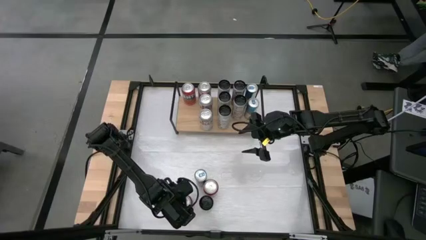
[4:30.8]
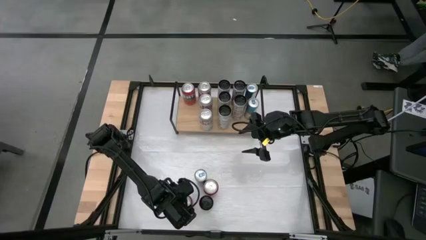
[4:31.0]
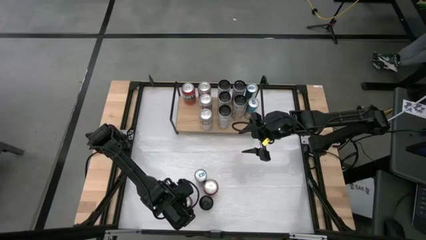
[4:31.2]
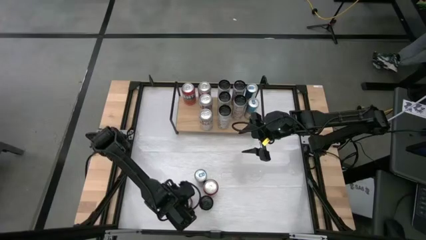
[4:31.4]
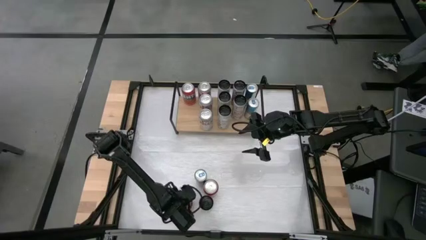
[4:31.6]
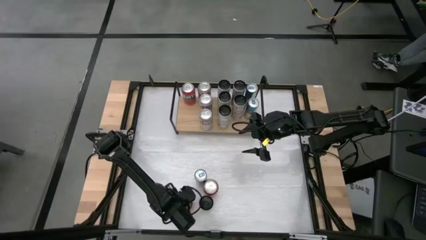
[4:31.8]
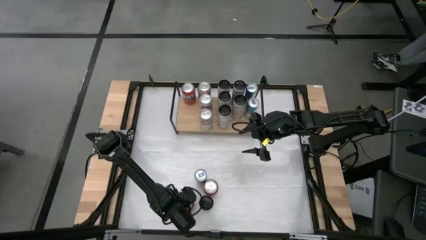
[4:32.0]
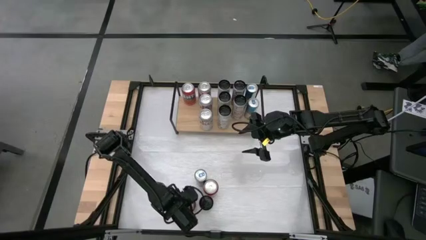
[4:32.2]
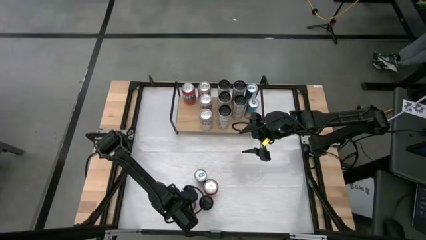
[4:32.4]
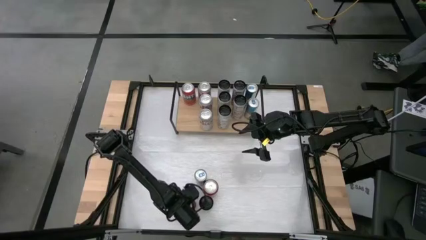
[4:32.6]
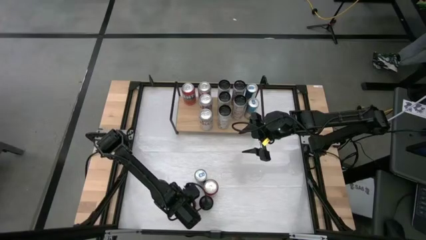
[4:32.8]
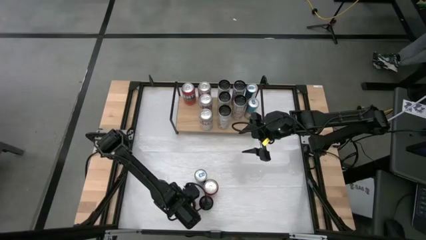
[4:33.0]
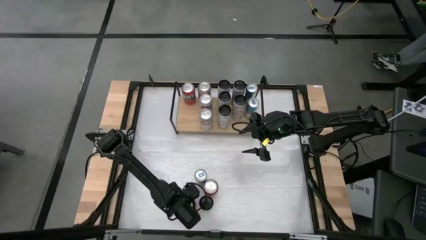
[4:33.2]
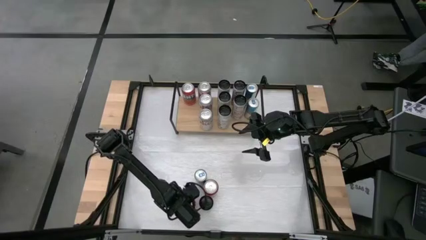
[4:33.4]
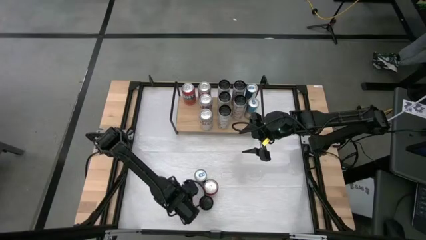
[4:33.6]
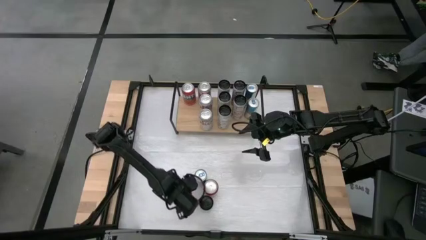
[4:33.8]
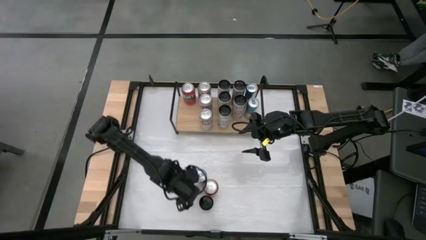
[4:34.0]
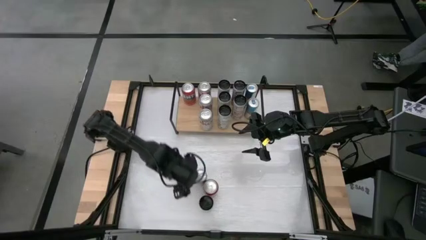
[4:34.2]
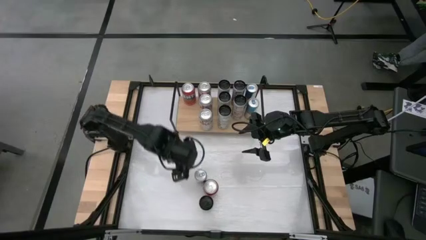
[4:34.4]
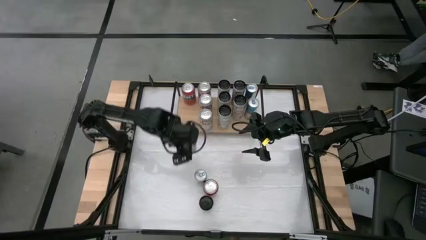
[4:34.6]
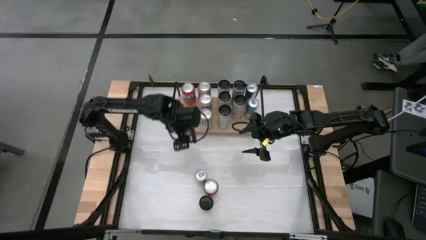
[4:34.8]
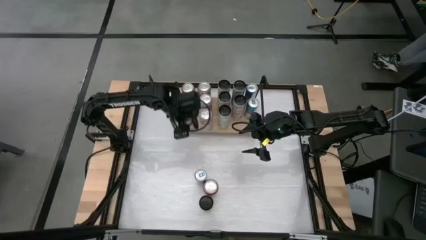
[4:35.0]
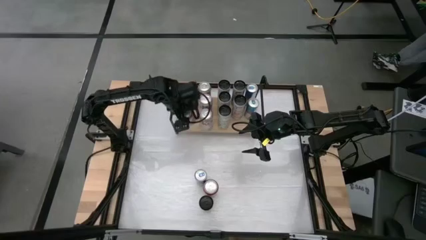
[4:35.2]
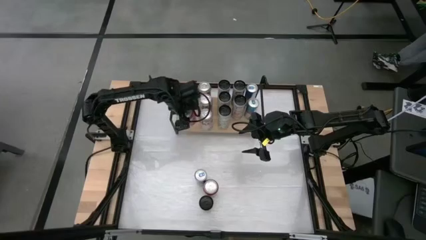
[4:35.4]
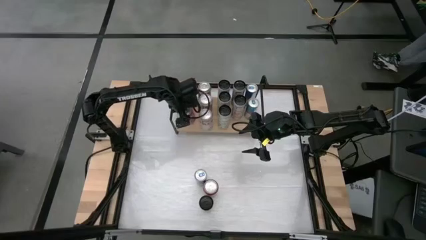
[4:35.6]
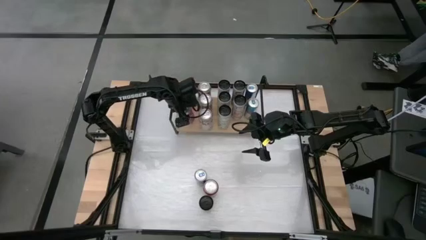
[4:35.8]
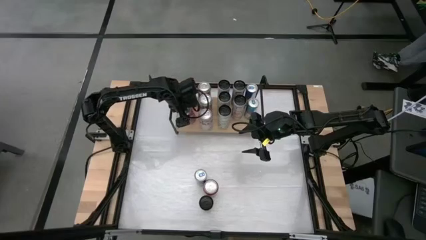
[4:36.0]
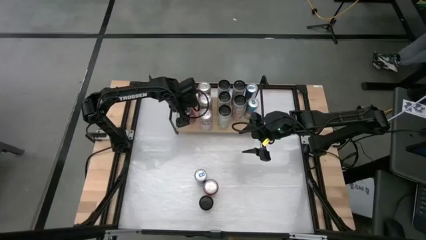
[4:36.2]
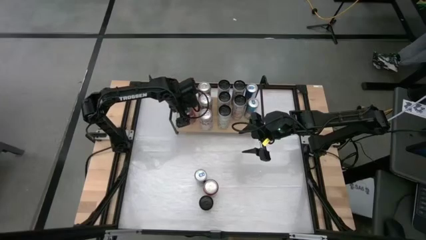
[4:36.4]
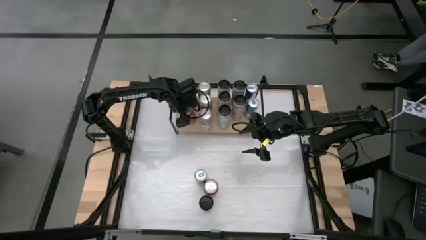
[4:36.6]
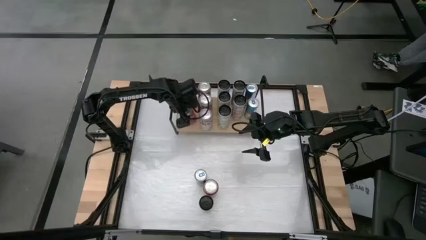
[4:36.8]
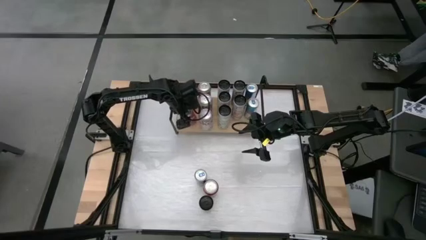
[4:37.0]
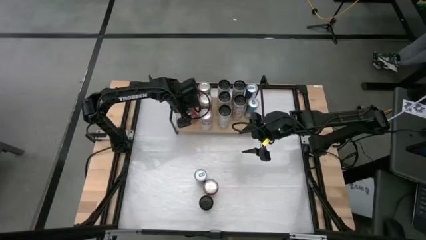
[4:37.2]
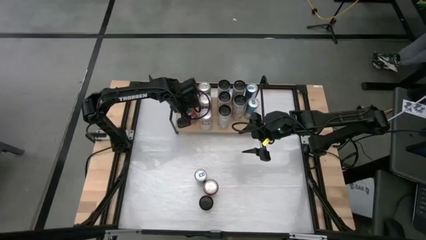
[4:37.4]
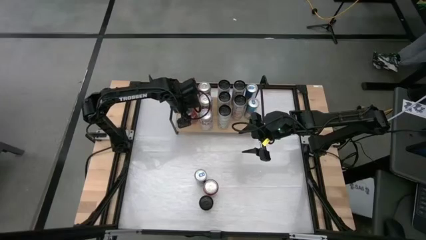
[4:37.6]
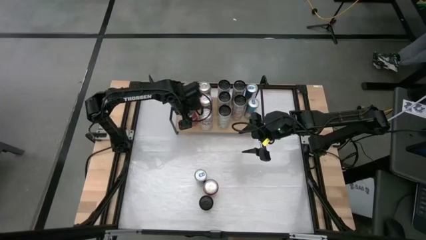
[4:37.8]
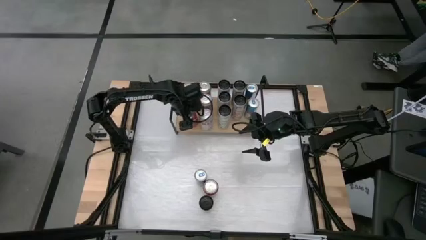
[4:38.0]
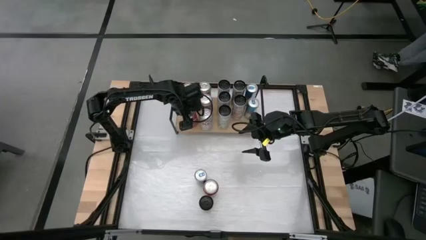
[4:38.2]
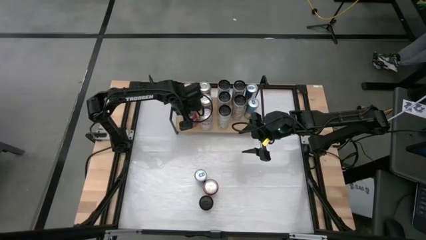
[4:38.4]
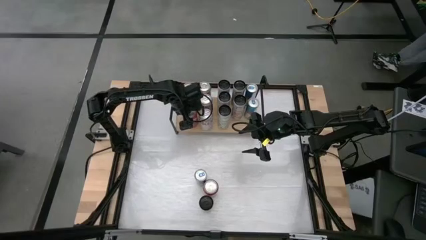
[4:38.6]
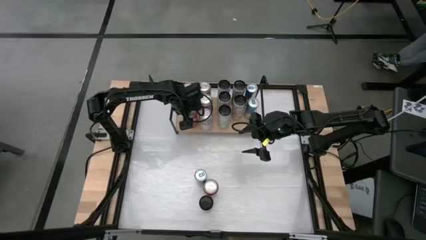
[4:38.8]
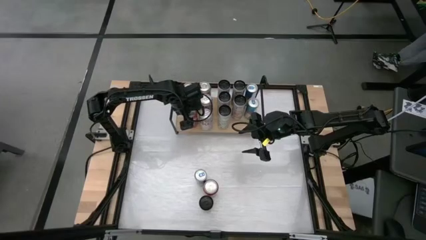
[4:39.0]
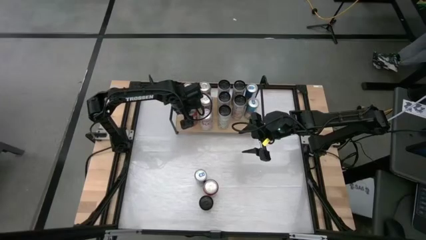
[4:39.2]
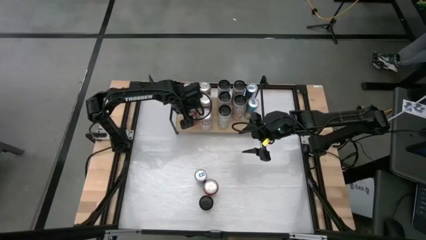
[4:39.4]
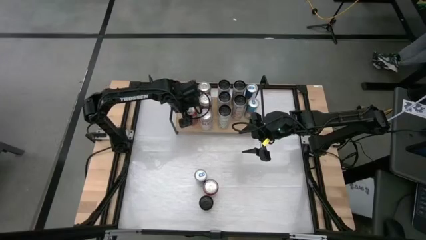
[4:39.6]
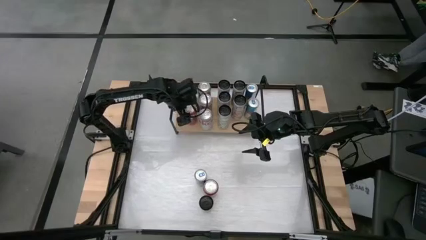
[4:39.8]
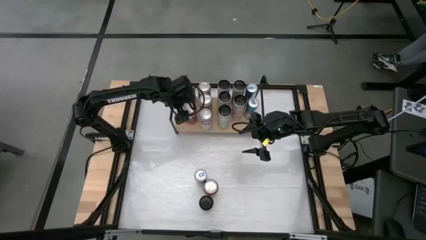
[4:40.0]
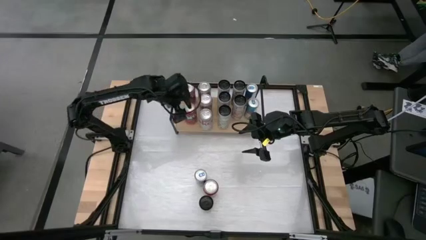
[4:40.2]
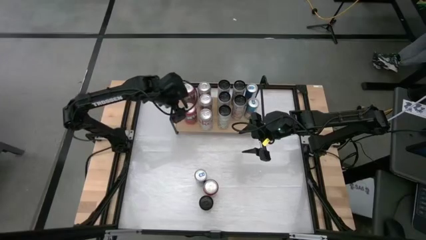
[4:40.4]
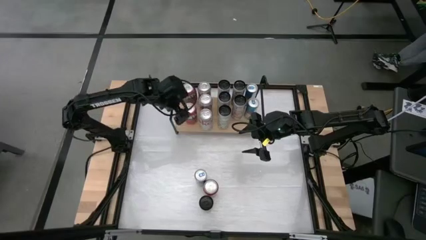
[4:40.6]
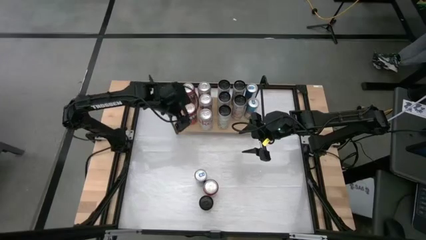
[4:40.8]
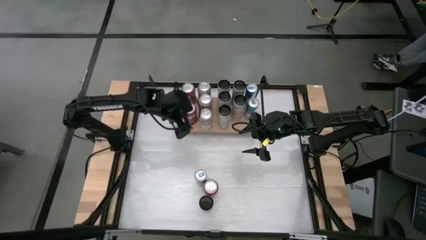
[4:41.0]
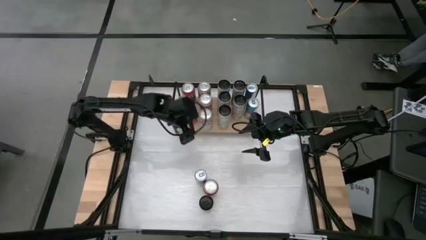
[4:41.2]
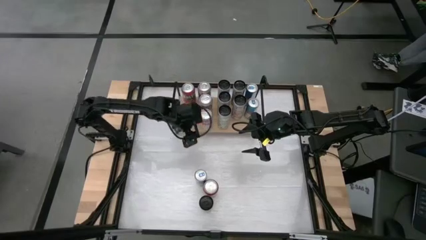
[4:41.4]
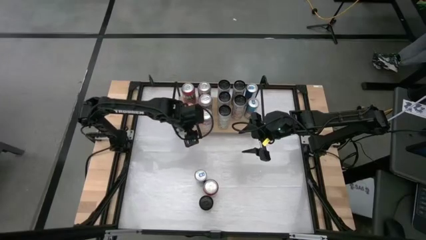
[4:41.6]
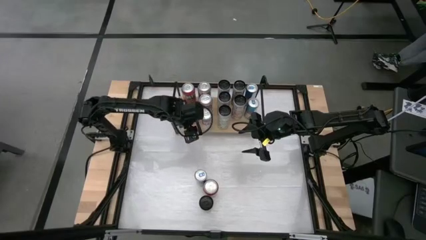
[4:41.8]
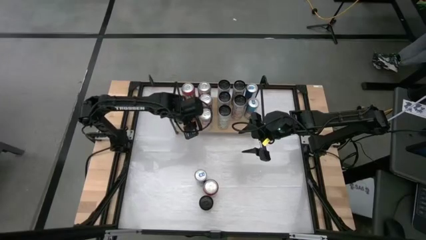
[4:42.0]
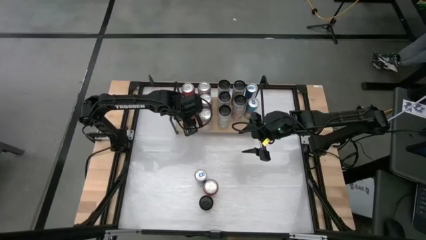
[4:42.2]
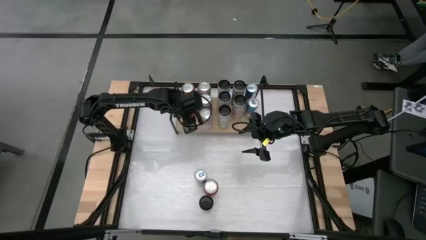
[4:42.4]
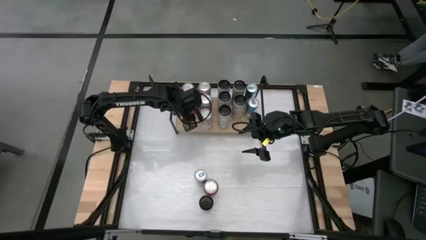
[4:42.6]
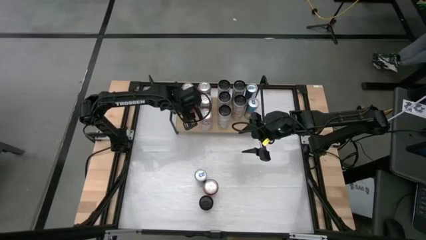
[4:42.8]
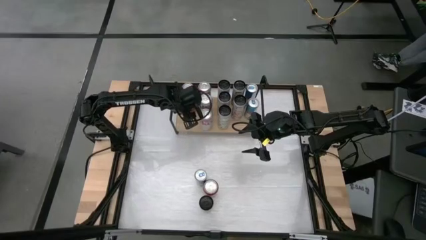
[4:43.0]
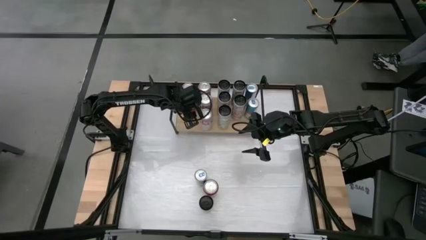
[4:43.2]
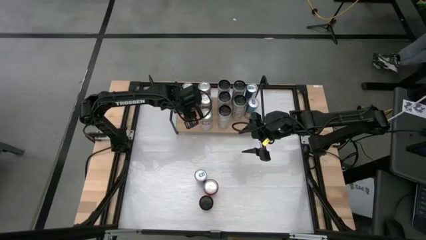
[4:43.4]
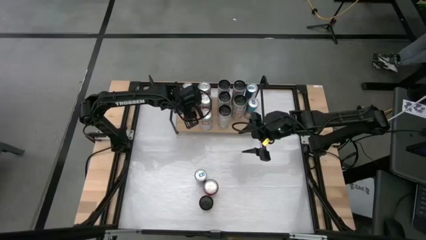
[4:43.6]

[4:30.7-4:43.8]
Task: Place canned beverage on shelf
Put the red soda can onto the shelf aligned with the other red soda can

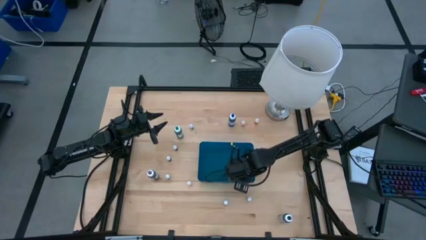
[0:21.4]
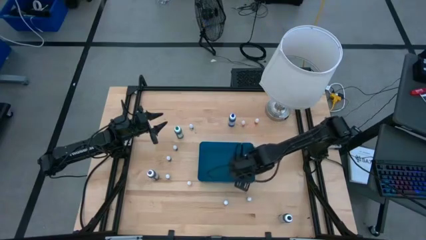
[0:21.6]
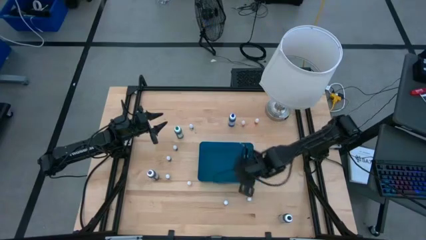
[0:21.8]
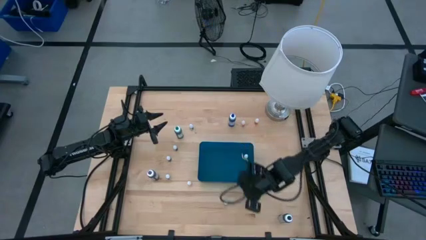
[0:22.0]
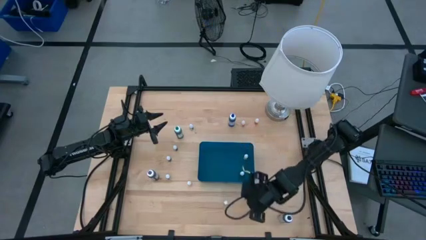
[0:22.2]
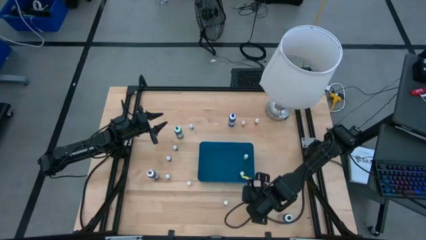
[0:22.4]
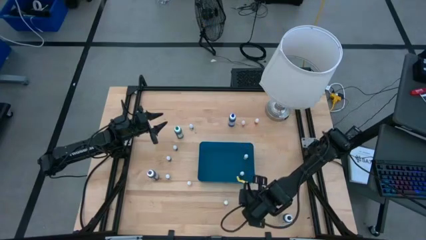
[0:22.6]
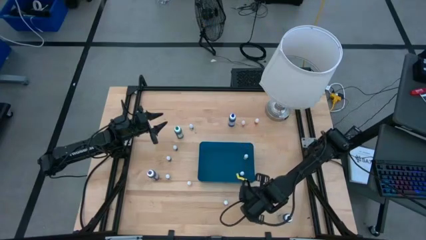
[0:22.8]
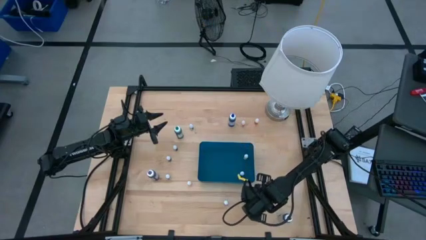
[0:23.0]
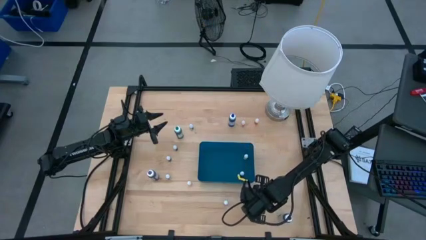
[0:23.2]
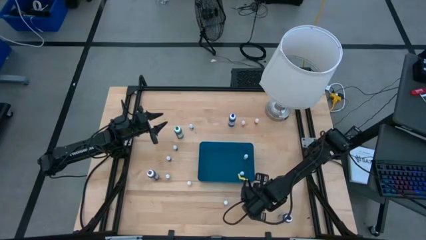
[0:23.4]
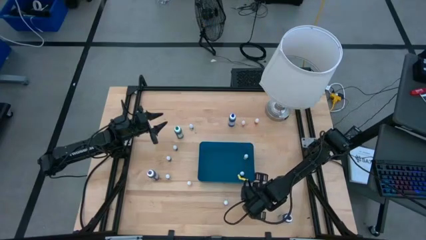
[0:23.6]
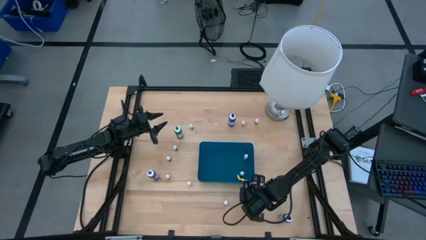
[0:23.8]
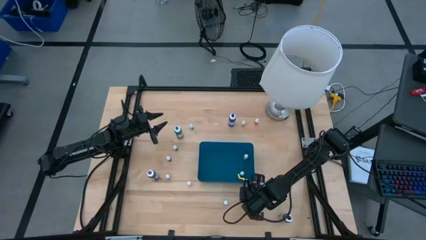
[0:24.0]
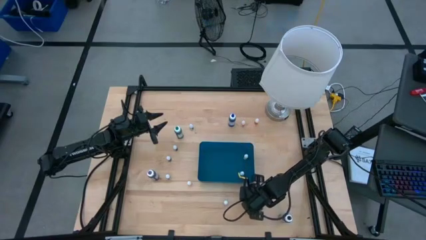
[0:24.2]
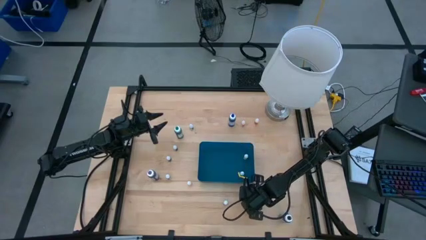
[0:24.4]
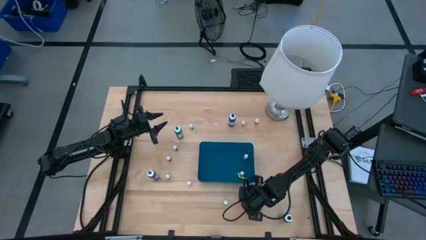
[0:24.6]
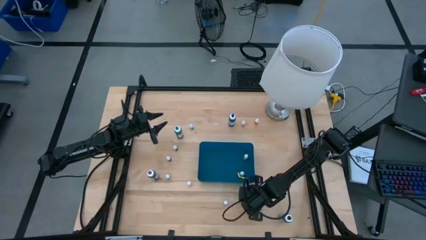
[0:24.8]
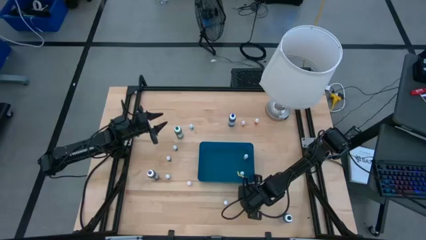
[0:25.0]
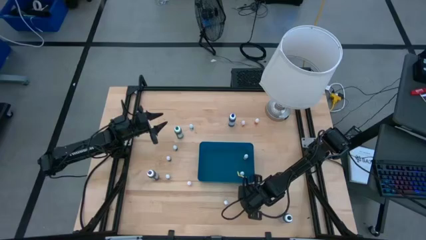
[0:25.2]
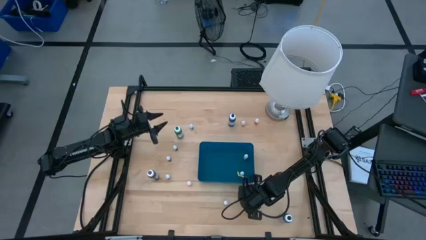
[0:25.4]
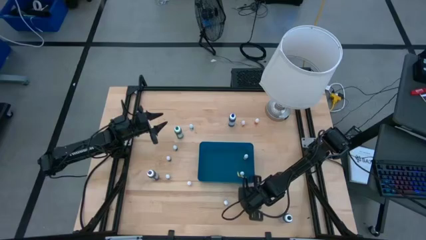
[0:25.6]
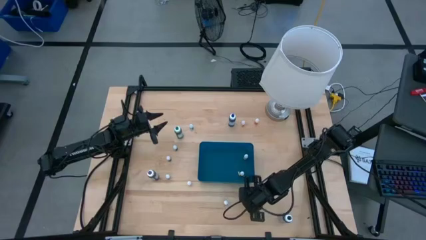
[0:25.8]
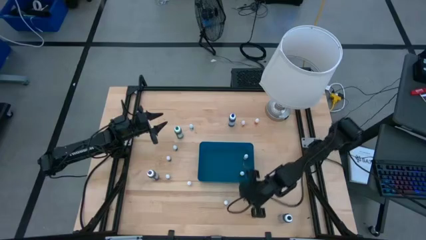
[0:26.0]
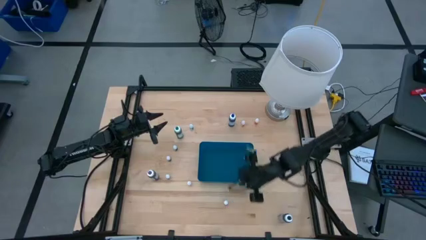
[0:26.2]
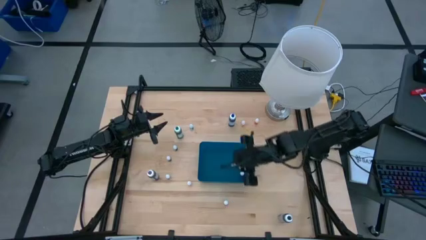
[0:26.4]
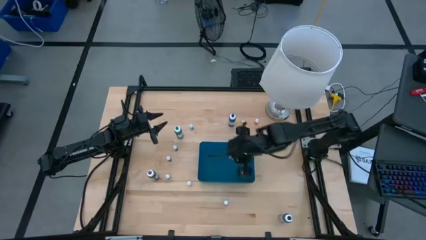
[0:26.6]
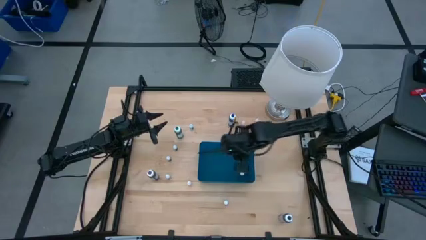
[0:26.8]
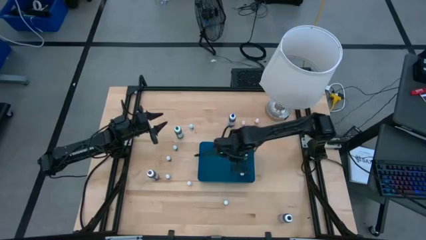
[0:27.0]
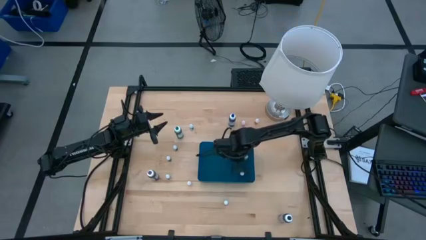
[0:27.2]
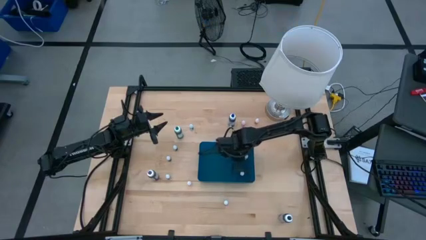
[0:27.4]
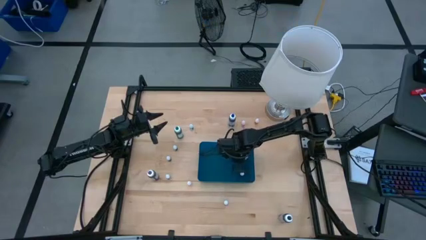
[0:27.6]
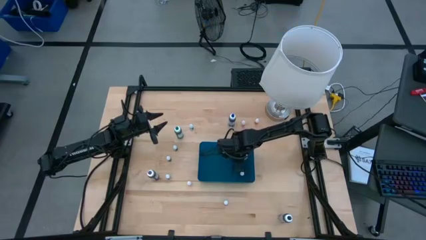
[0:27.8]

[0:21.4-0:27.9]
Task: Pick & Place food coloring
Put the small green food coloring bottle into the blue bin
